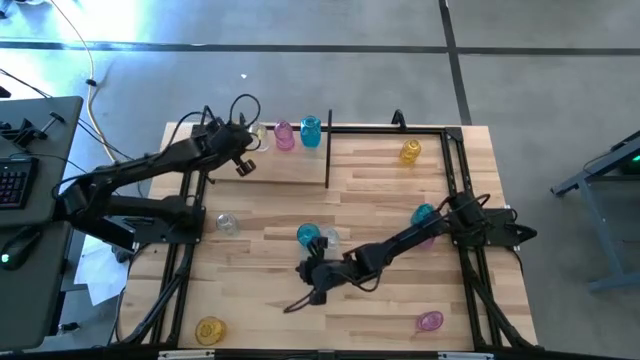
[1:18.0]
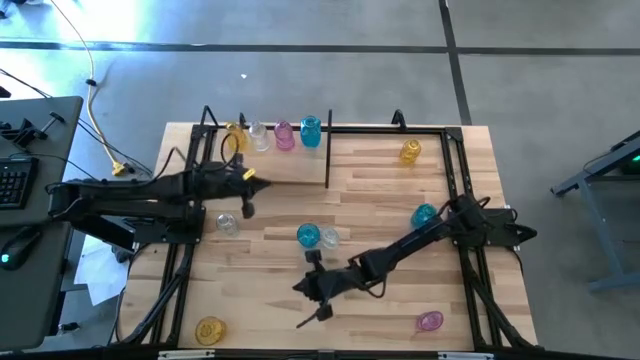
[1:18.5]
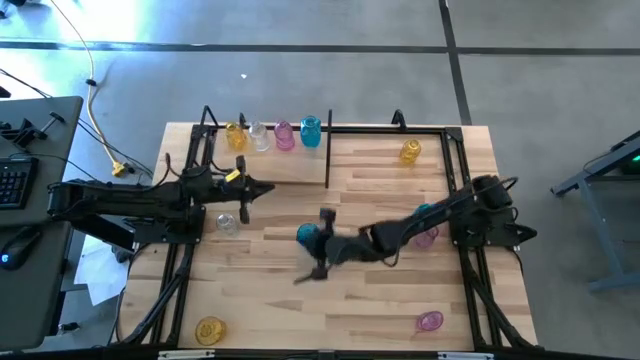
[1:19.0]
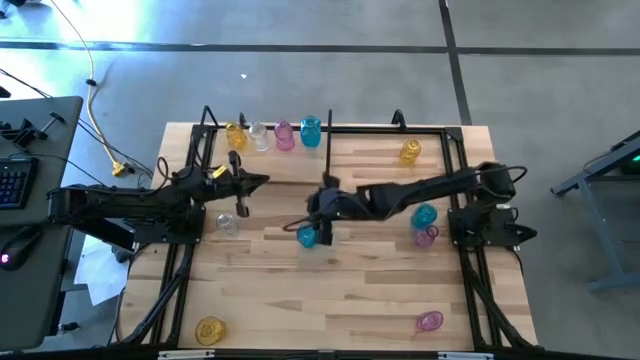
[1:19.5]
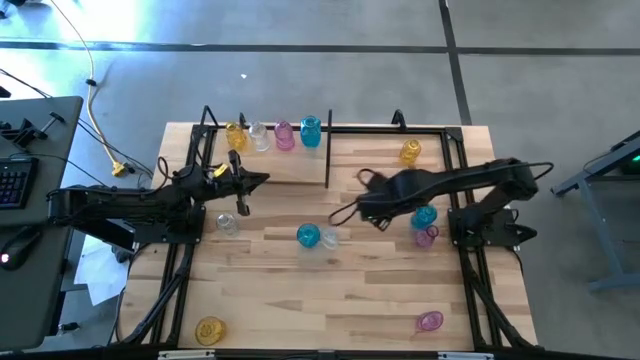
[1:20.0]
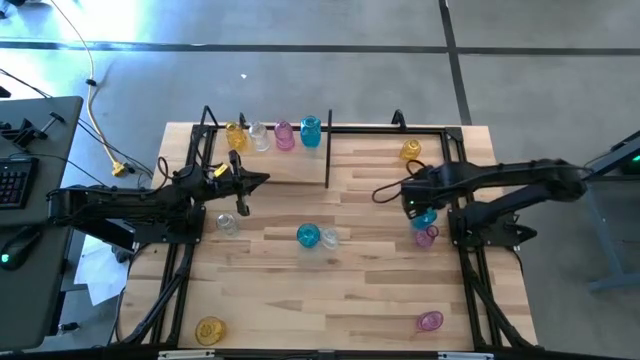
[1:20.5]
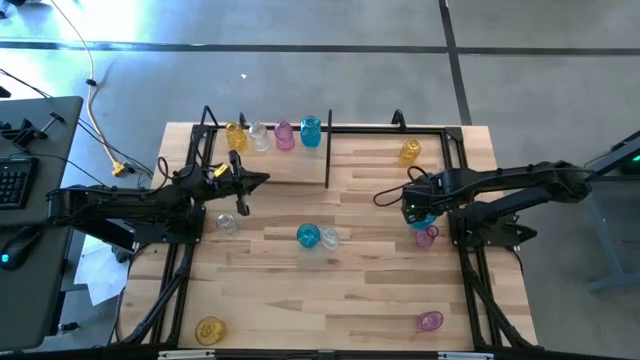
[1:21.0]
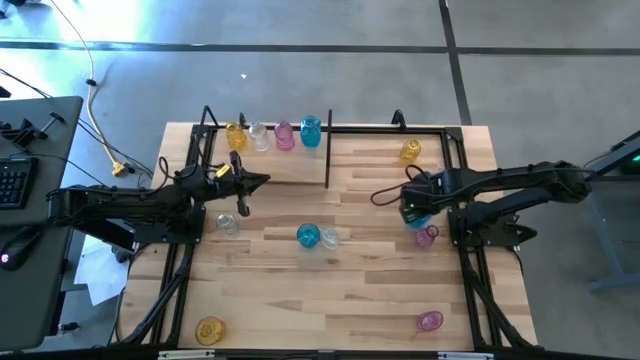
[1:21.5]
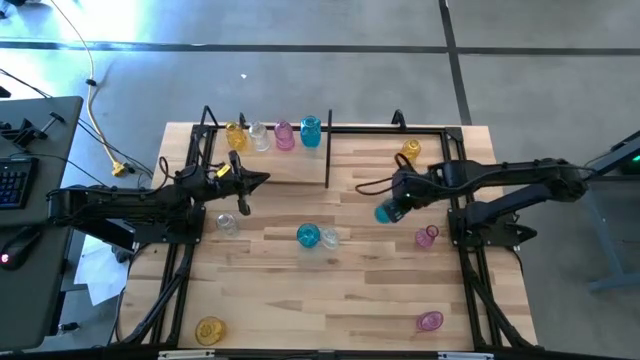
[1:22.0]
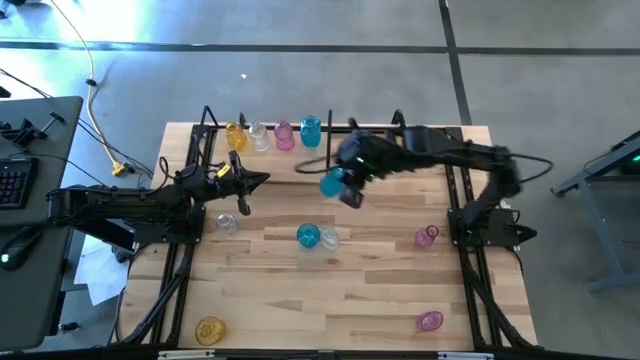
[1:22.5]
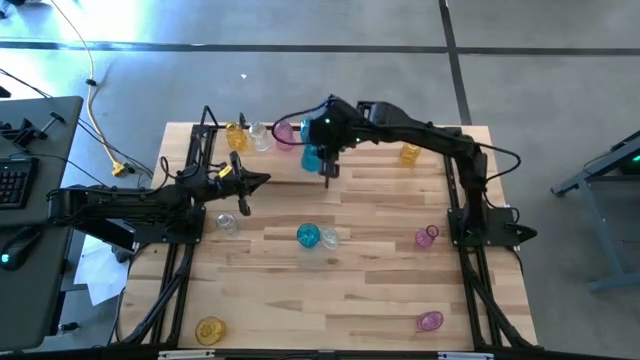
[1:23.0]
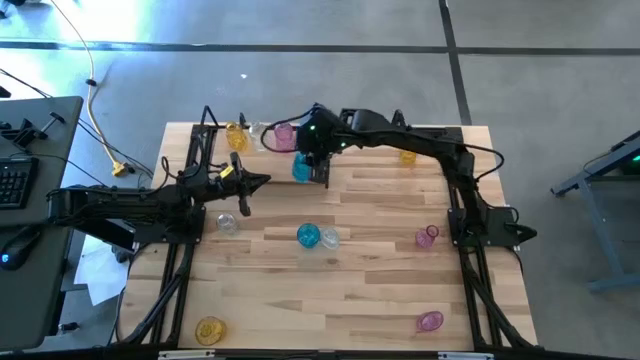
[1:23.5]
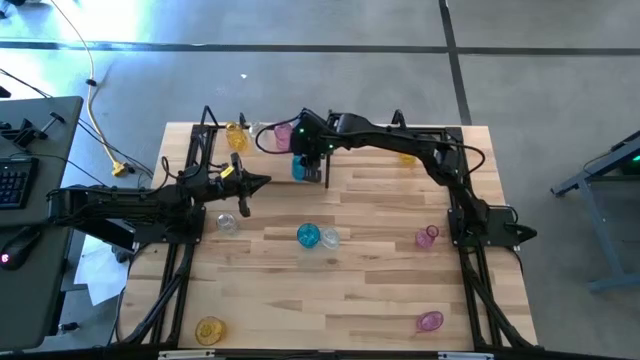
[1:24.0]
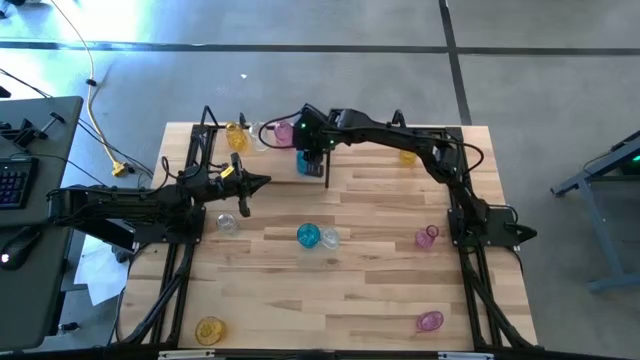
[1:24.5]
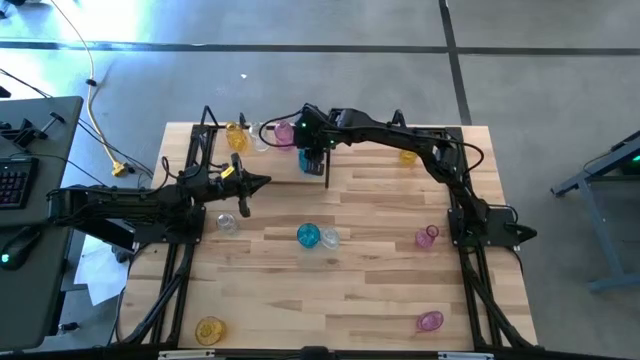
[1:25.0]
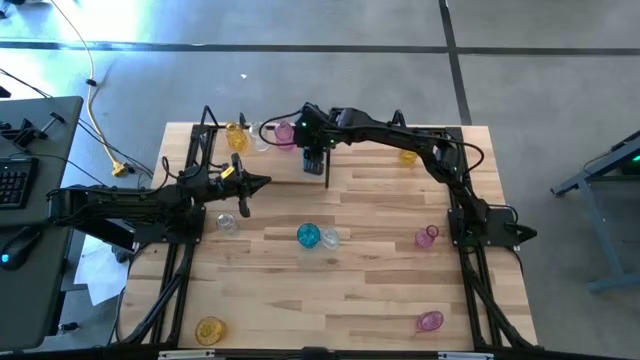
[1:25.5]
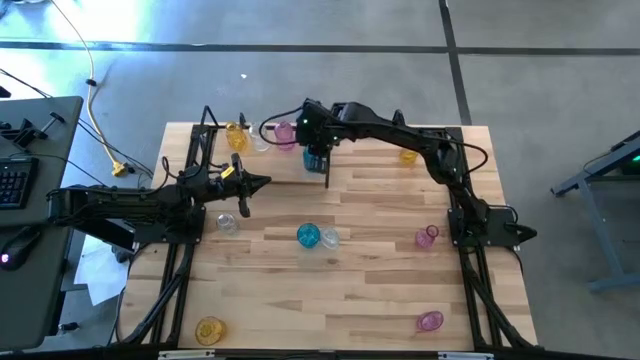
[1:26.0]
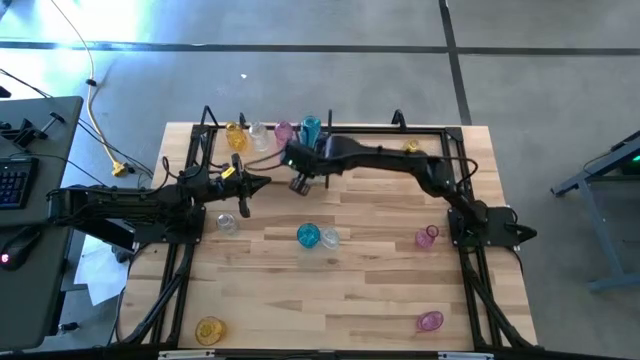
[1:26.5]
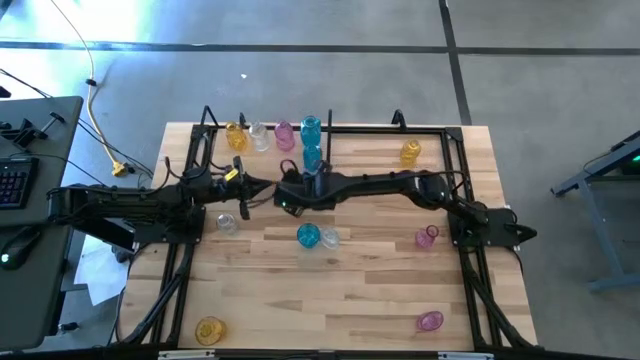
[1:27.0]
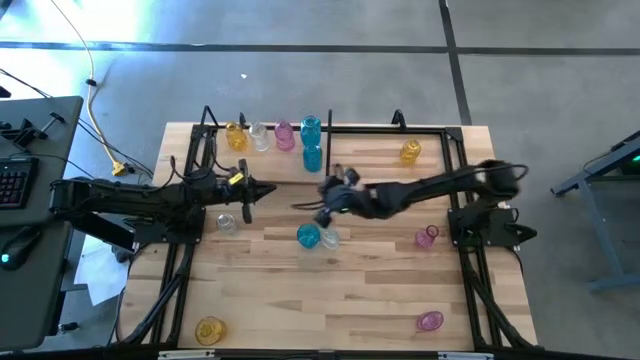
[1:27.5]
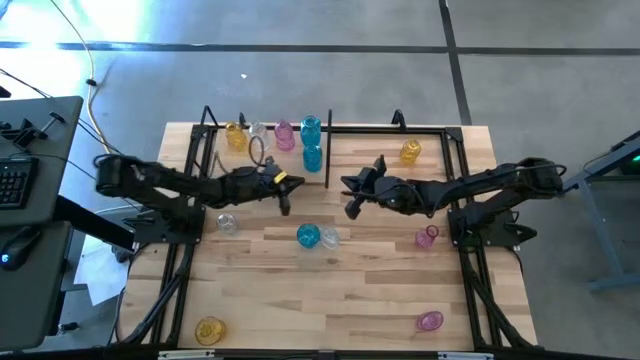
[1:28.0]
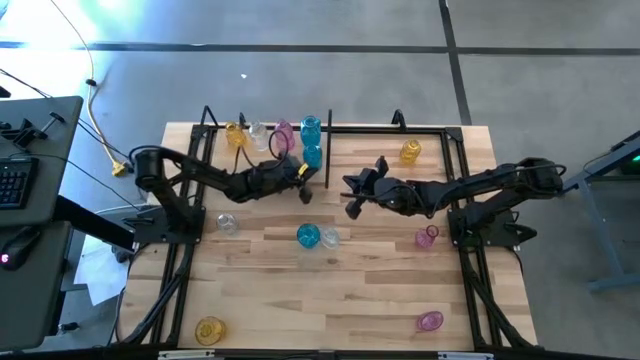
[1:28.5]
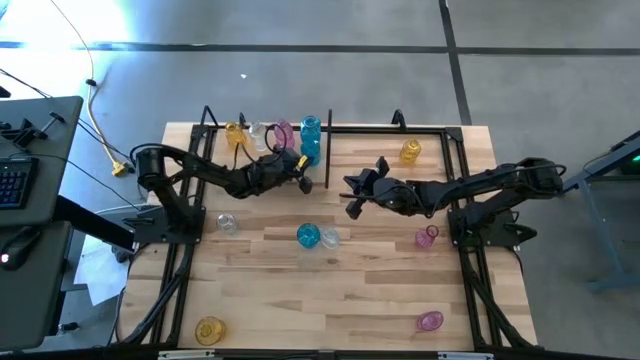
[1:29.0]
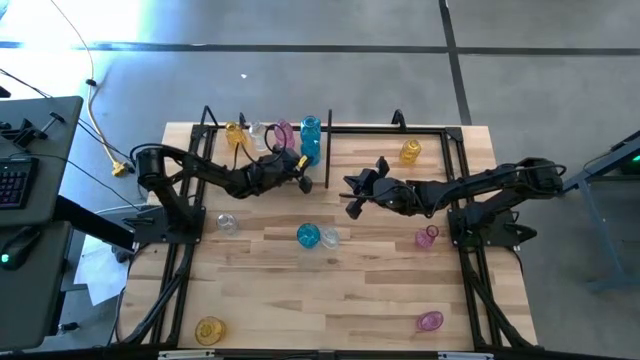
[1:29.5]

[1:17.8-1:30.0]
Task: sort vases onto shelf
Put the right blue flower vase aligned with the other blue flower vase on the shelf

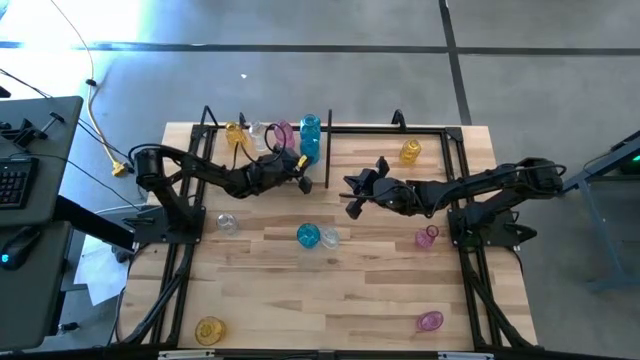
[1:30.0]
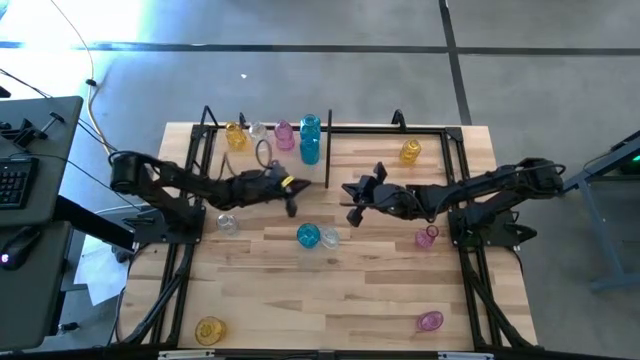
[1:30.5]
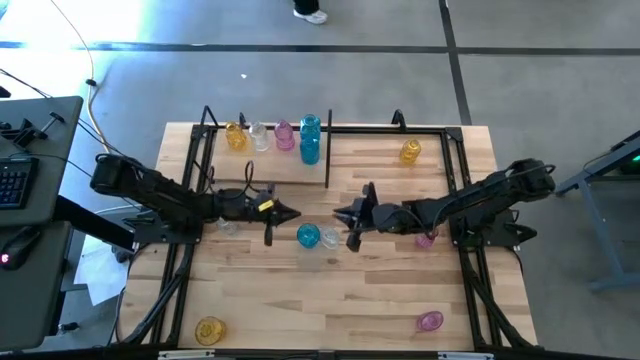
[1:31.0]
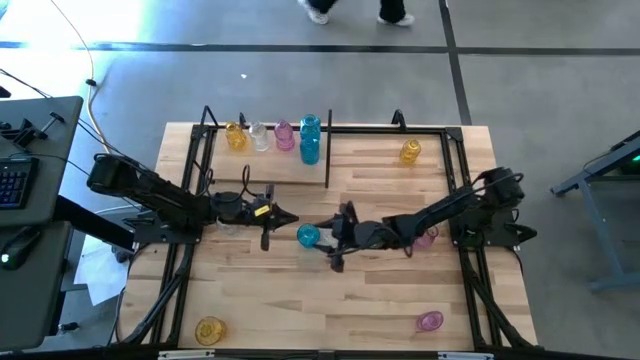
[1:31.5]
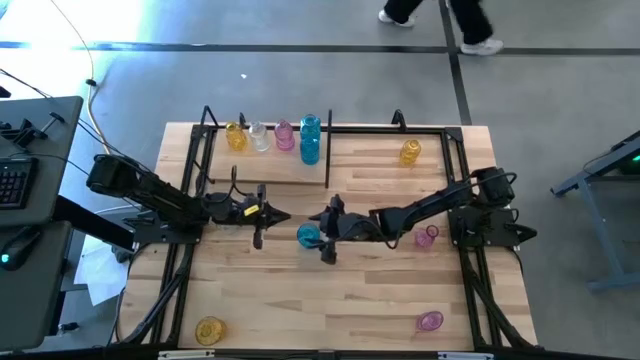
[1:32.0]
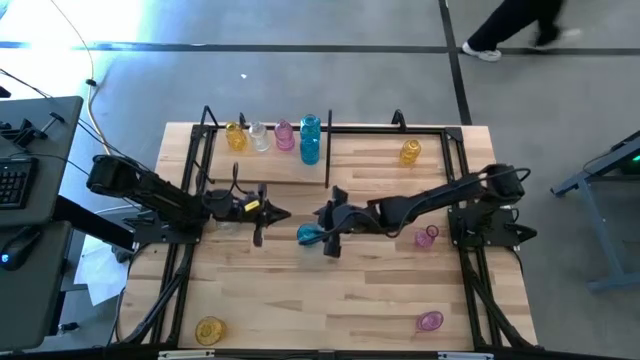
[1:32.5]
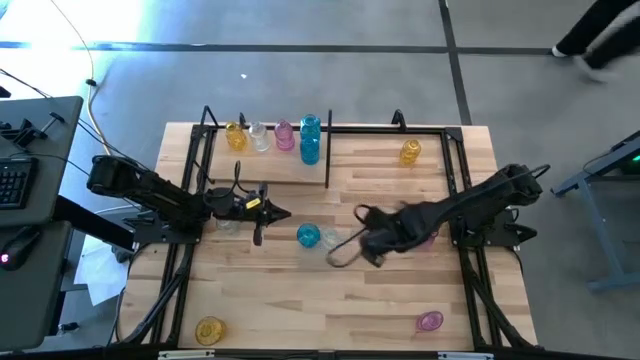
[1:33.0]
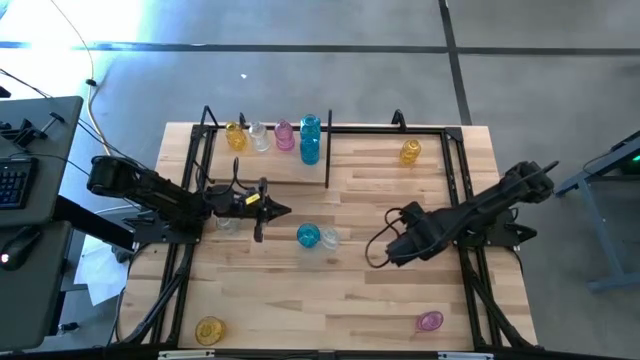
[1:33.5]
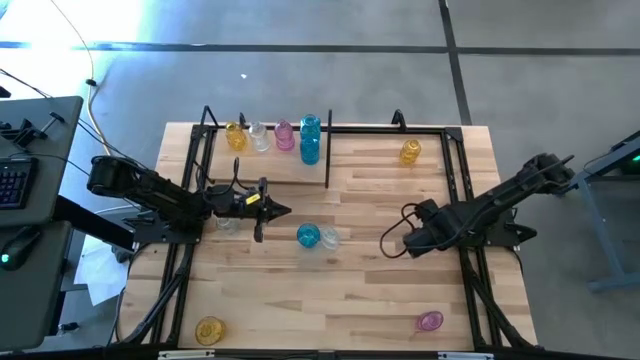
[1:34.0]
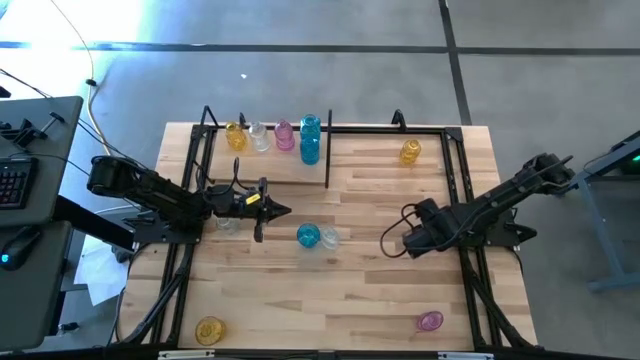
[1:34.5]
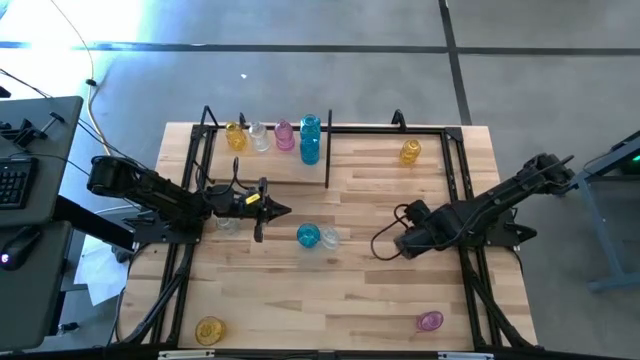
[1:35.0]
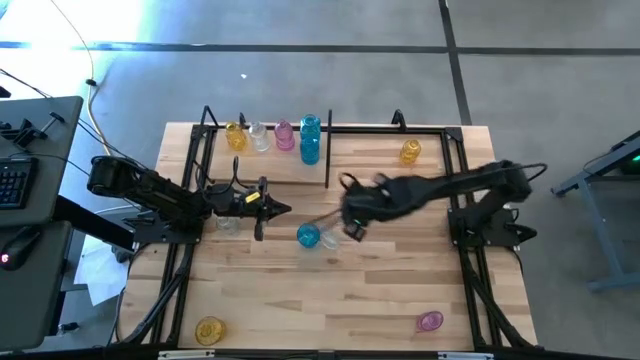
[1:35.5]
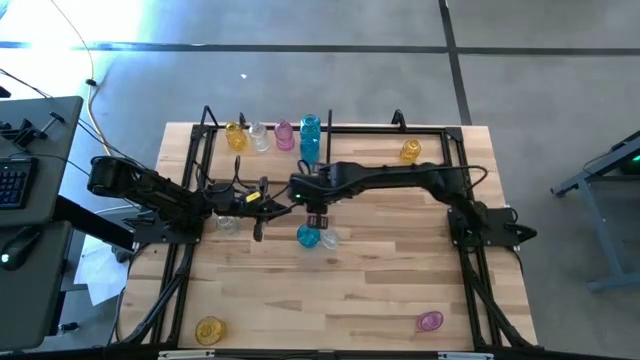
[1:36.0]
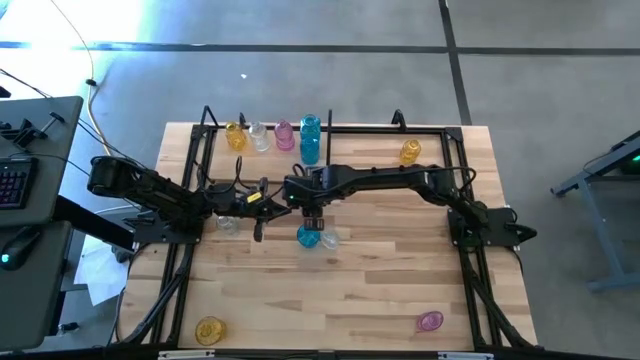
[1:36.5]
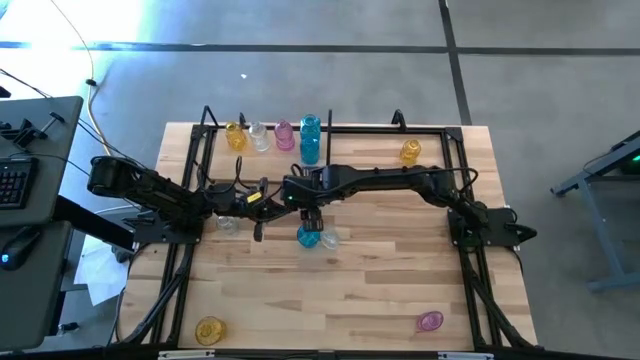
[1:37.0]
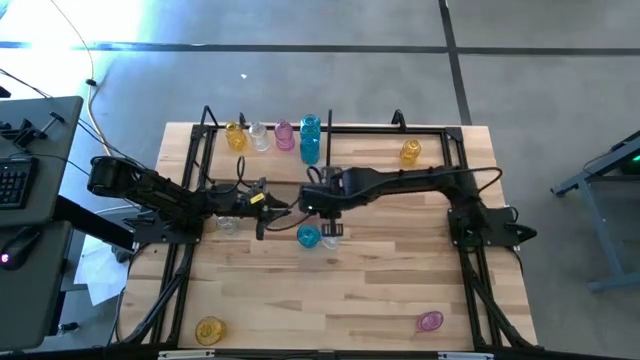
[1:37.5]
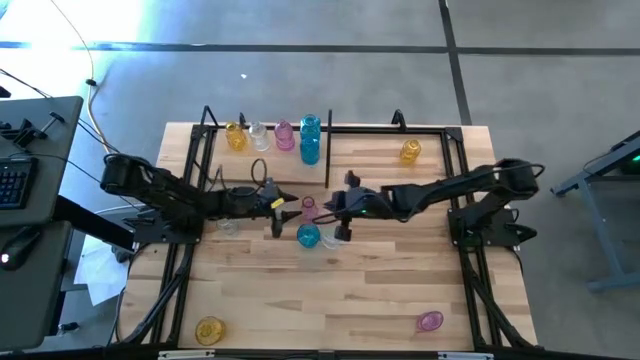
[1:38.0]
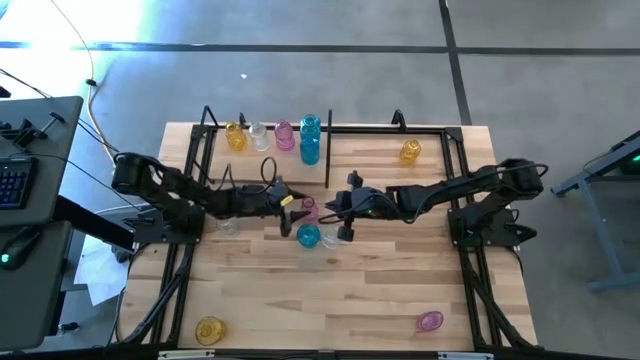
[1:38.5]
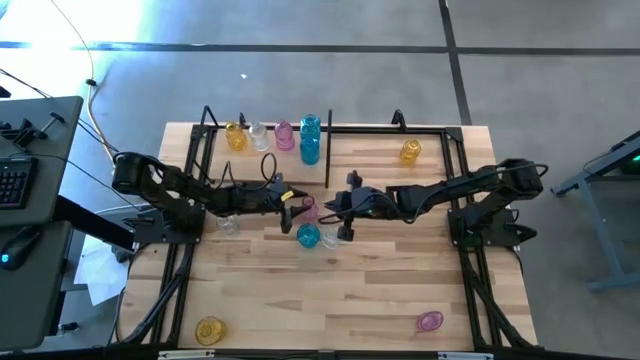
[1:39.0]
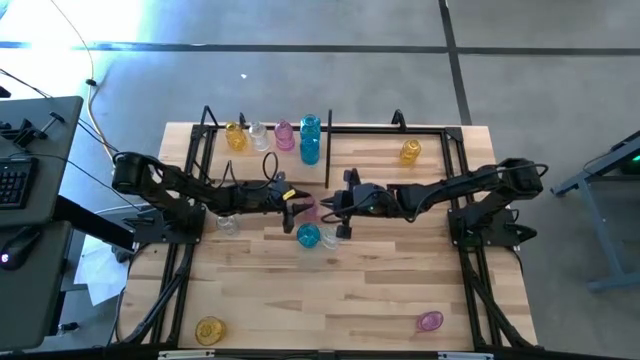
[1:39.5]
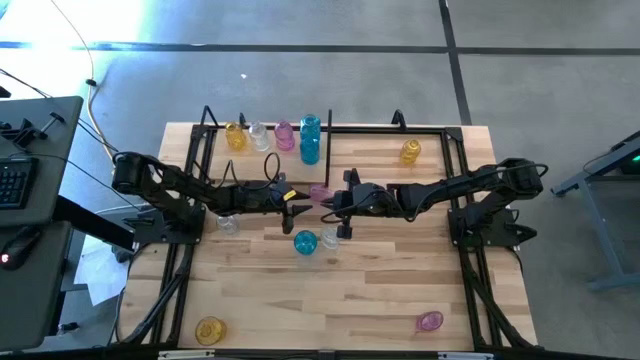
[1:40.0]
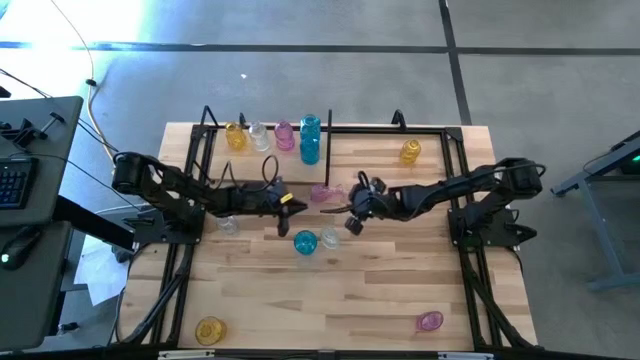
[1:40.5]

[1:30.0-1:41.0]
Put the top purple flower vase aligned with the other purple flower vase on the shelf
